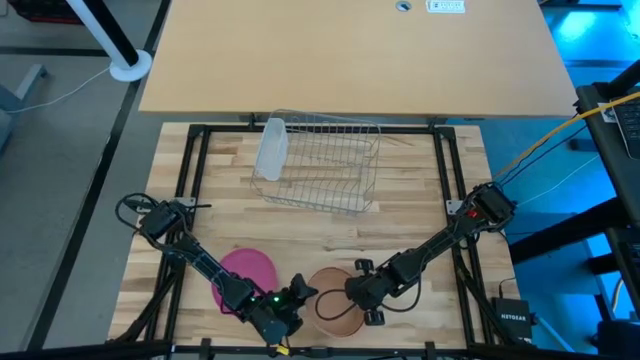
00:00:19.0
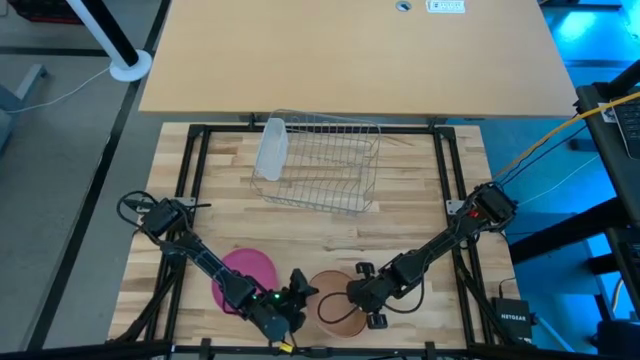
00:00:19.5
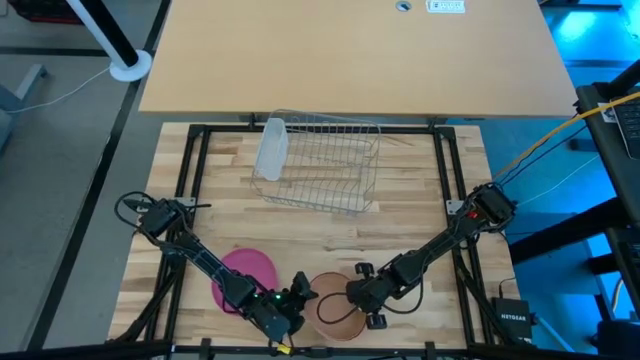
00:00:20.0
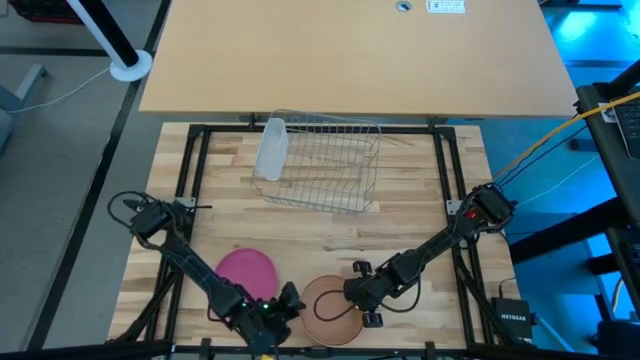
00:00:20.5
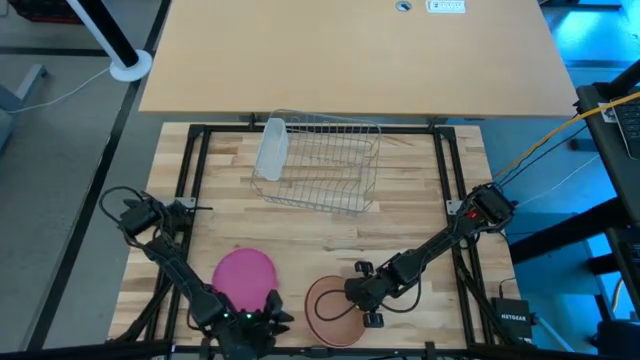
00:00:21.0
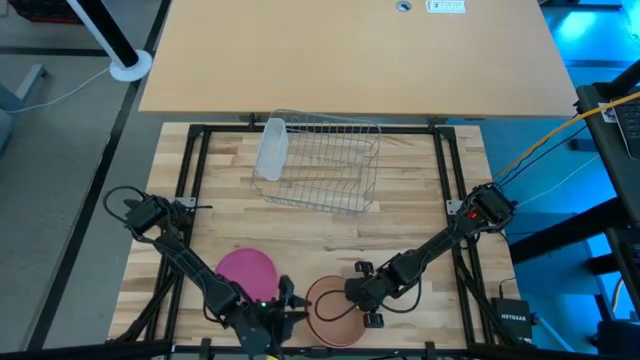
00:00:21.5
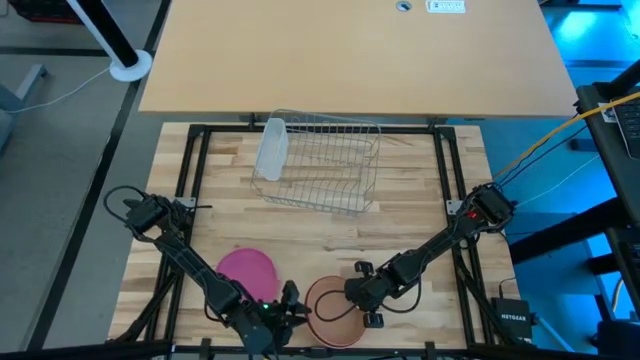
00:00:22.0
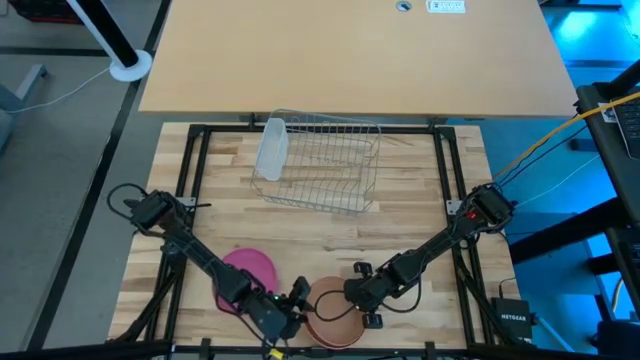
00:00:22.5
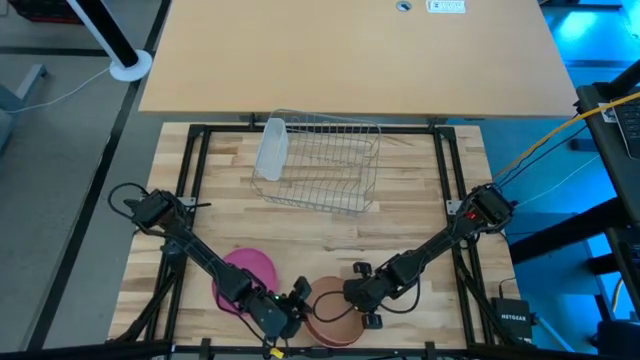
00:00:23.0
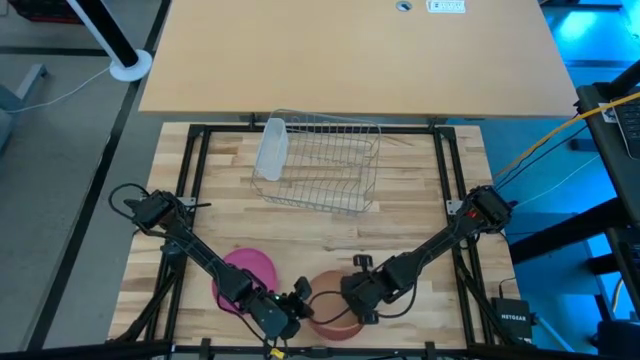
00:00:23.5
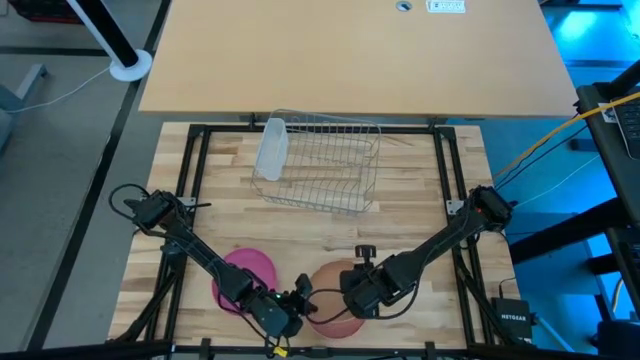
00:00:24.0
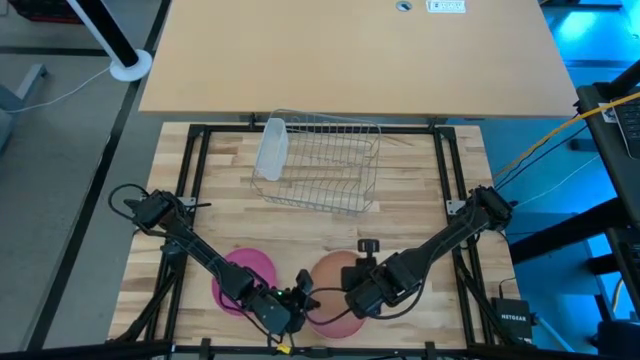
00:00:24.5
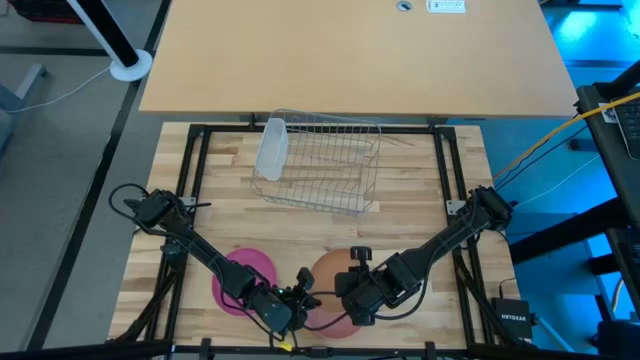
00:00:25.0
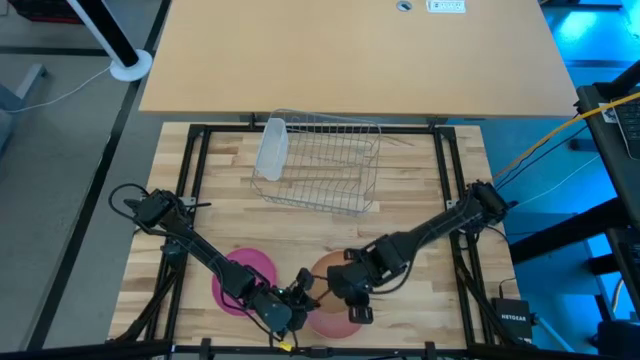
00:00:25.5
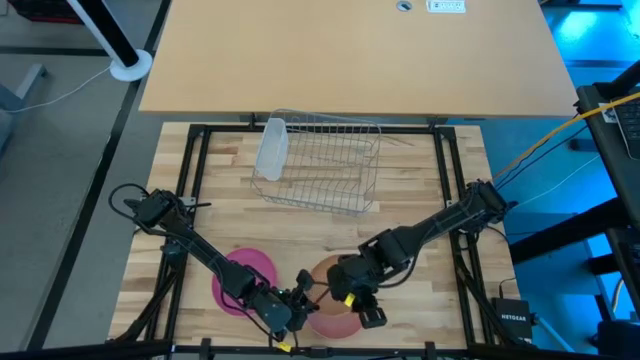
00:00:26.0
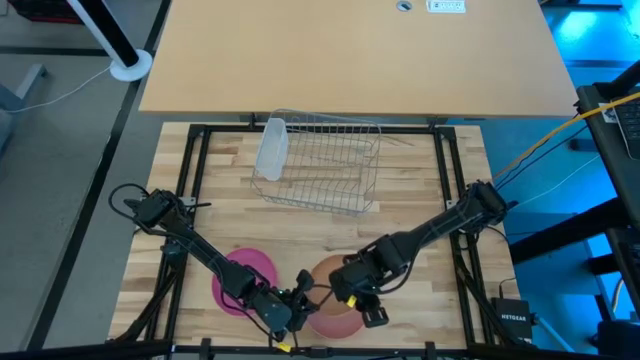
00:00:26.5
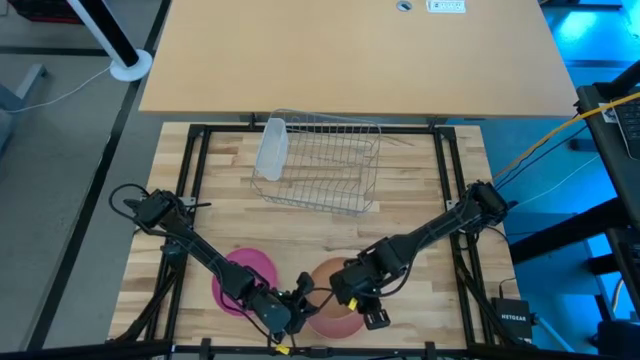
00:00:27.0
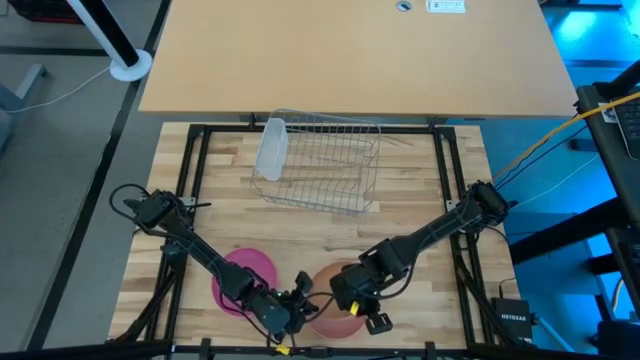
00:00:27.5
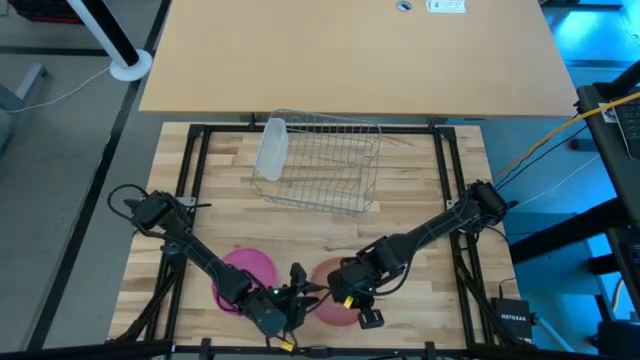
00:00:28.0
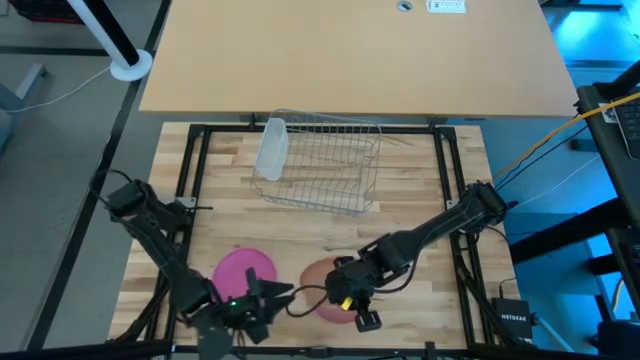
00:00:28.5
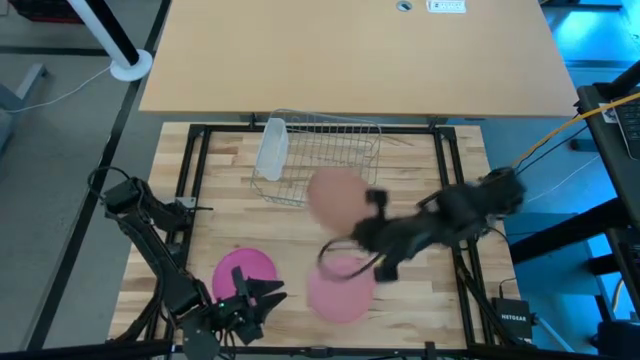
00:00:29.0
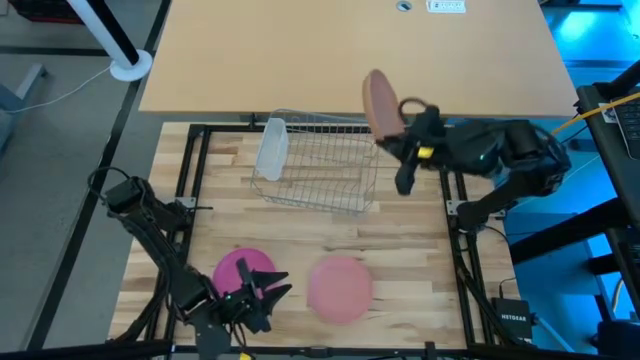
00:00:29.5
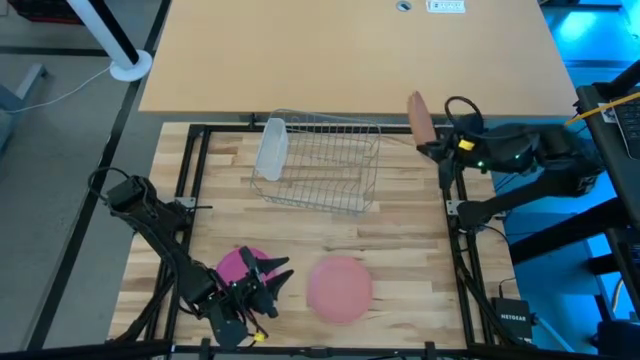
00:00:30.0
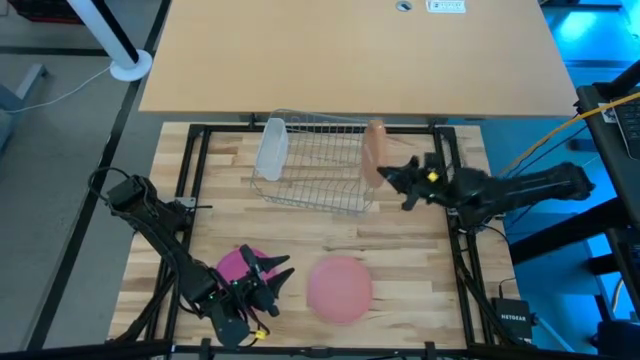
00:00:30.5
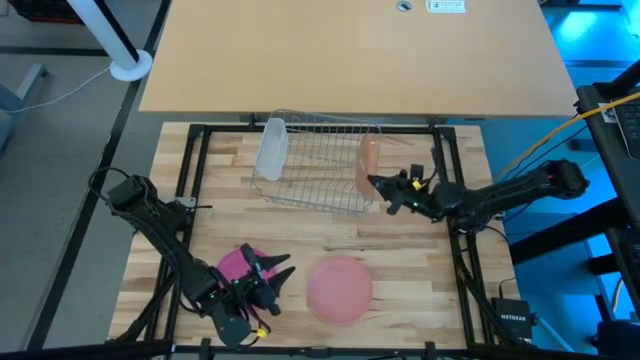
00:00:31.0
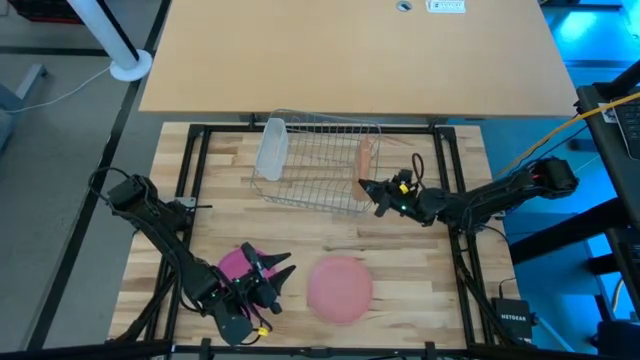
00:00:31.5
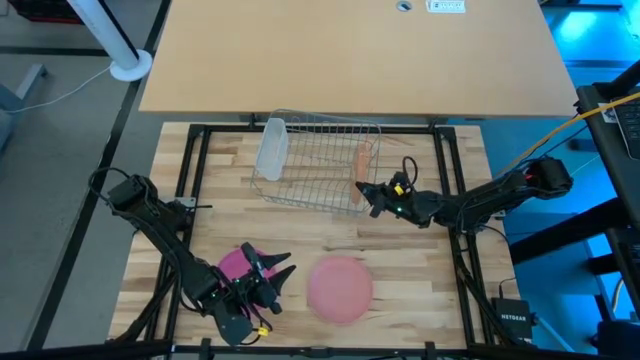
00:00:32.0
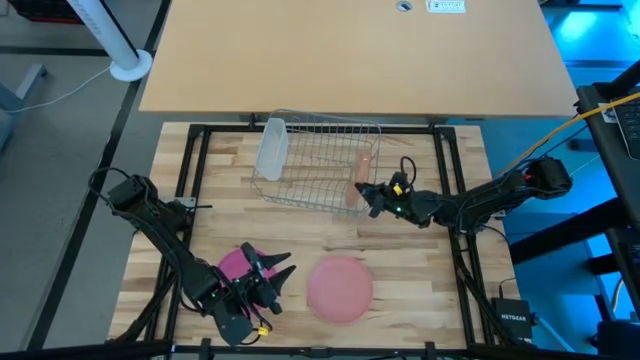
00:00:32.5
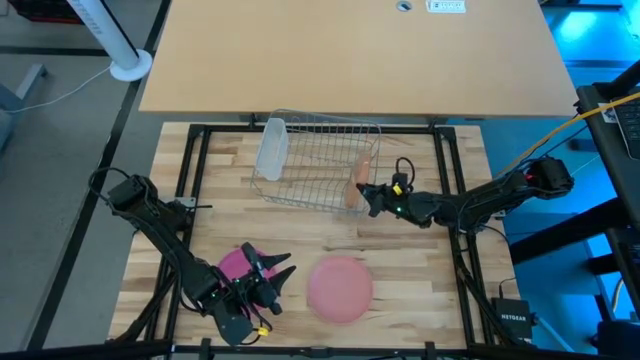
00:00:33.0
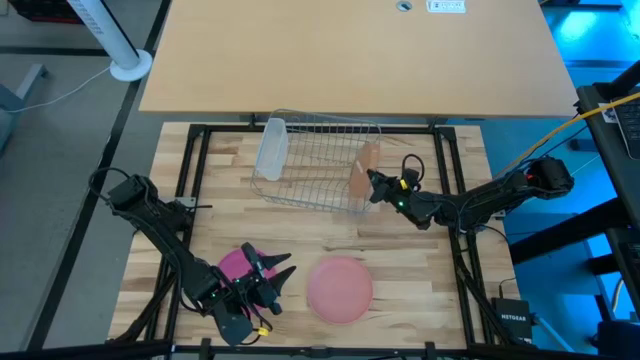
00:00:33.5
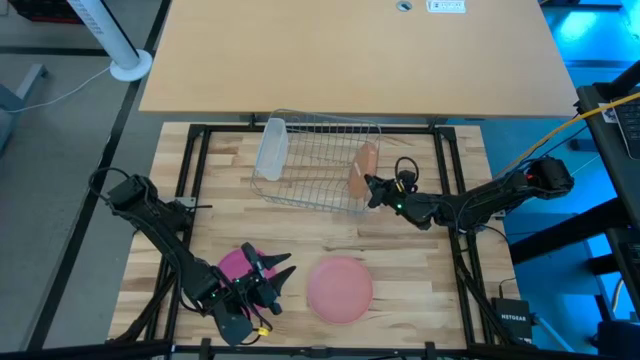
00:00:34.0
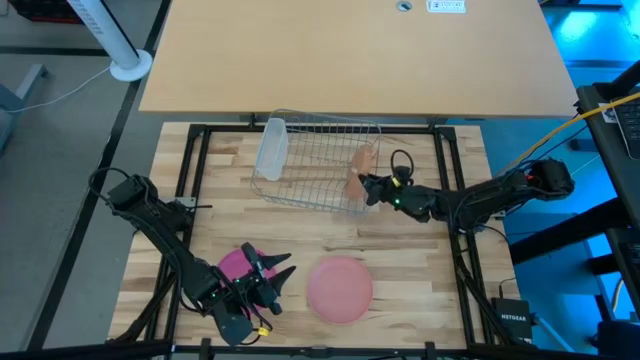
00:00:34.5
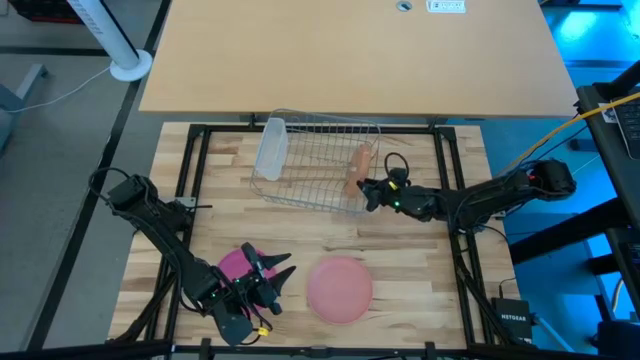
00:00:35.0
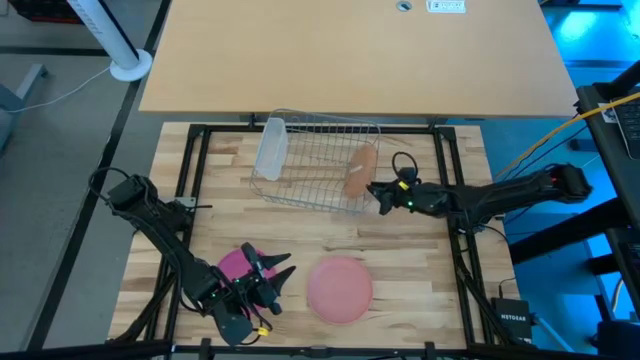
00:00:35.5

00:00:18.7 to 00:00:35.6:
Task: Sort dishes
Put the light red plate into the dish rack

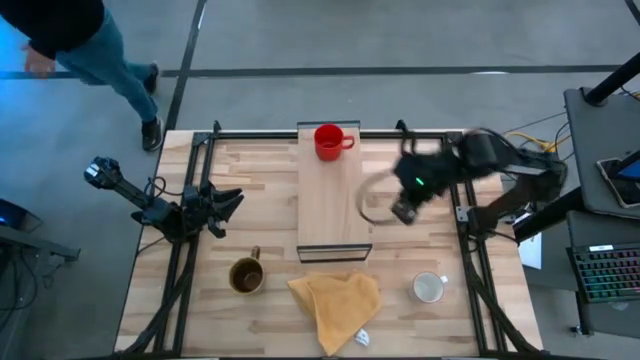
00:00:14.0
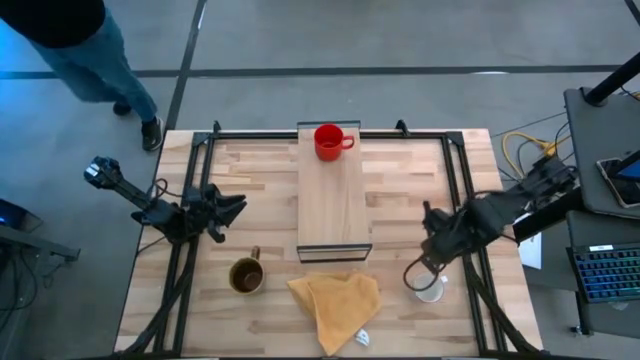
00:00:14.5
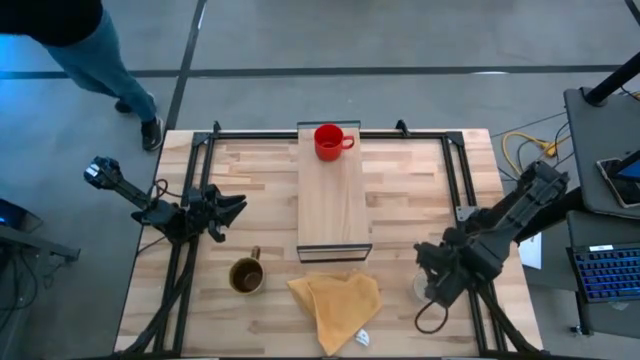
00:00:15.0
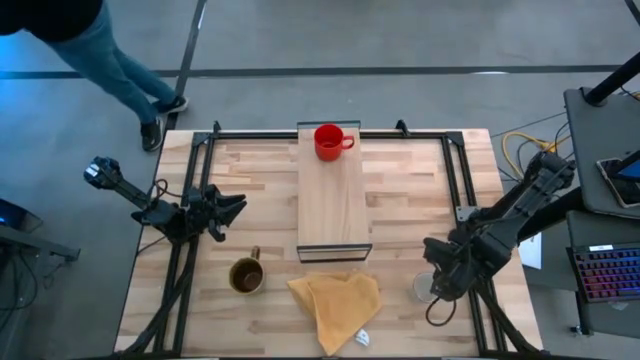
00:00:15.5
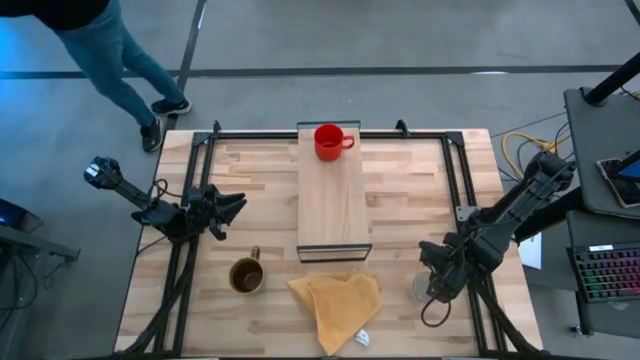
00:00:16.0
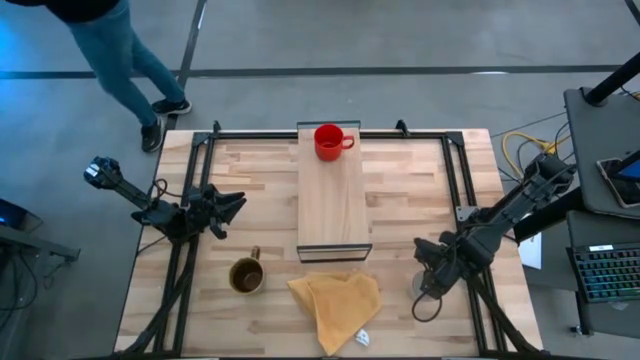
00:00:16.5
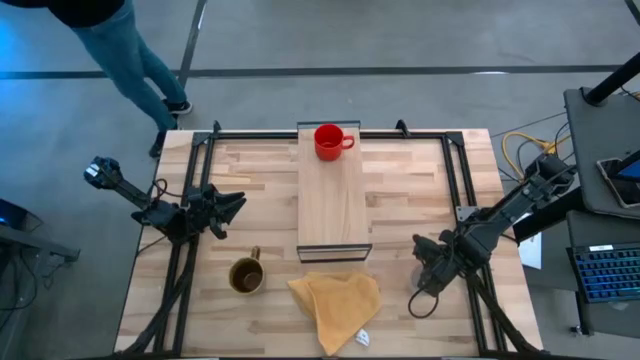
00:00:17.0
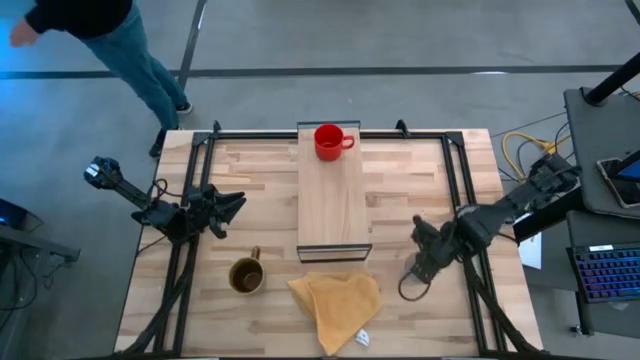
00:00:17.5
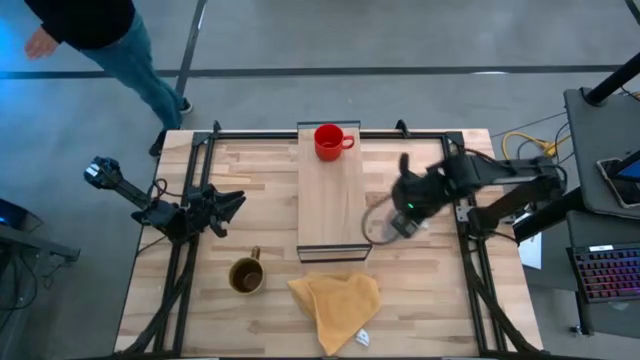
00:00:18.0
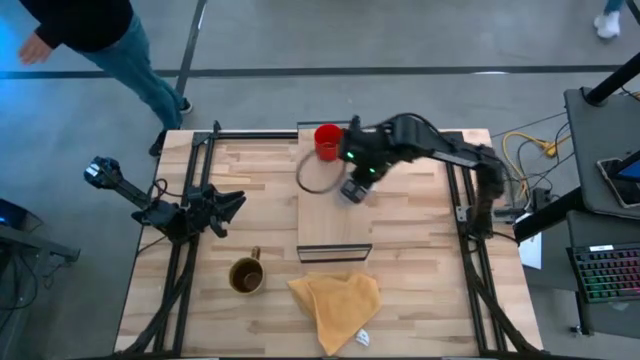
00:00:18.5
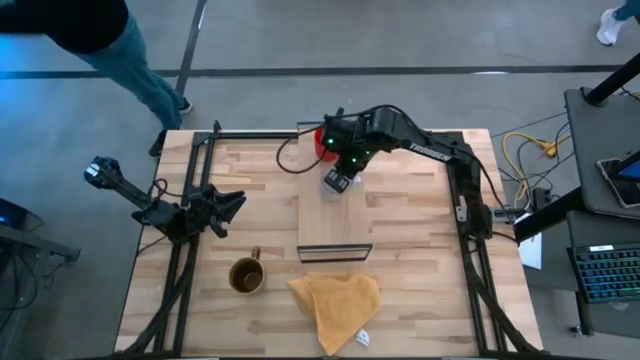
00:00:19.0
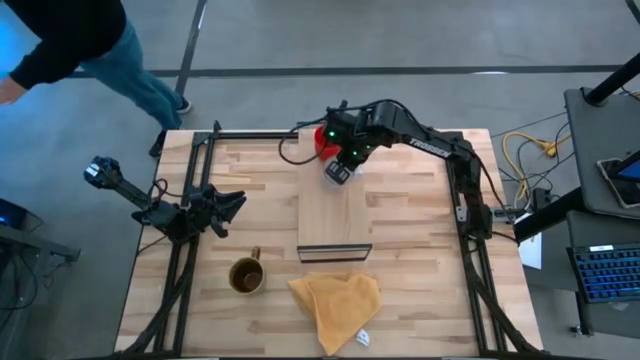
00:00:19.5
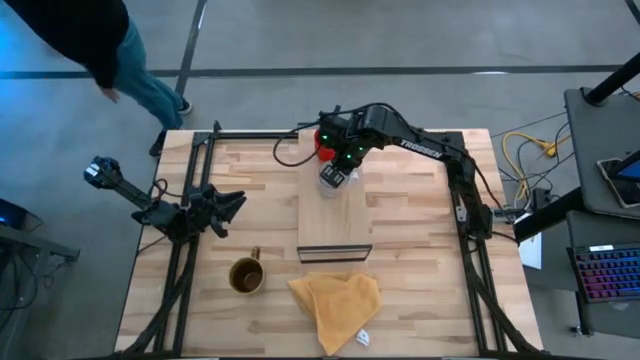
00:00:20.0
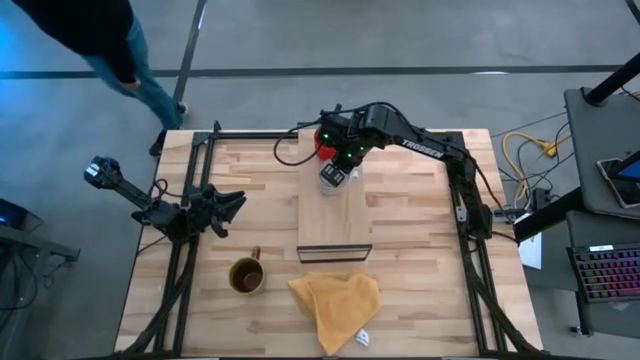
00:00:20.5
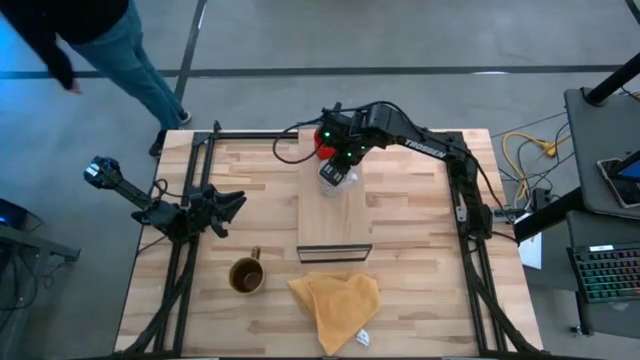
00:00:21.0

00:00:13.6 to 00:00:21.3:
Task: Stack small to large cups/mugs on shelf
Put the white gray mug on the shelf
